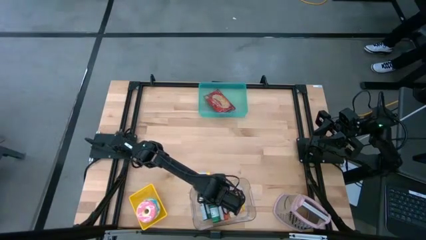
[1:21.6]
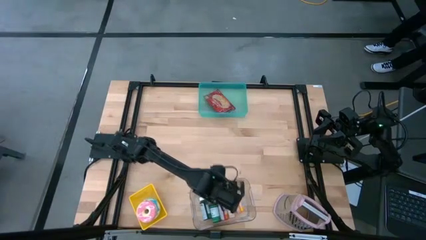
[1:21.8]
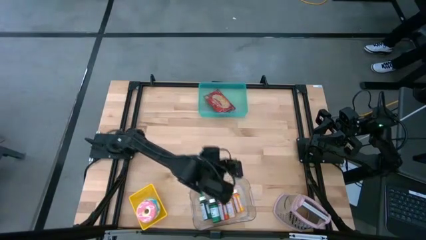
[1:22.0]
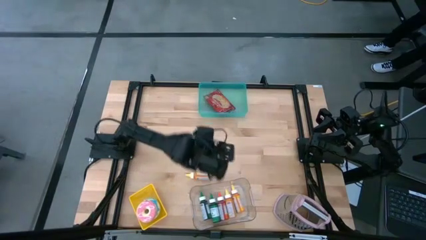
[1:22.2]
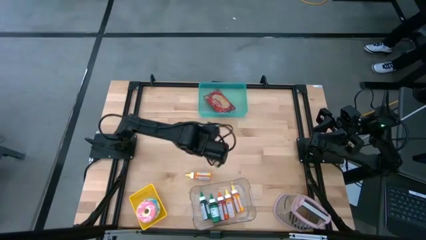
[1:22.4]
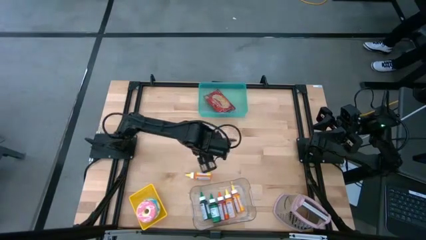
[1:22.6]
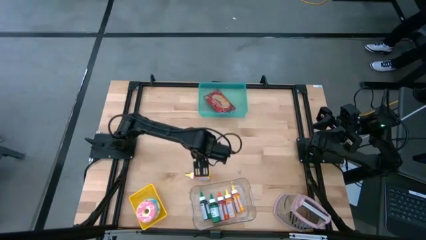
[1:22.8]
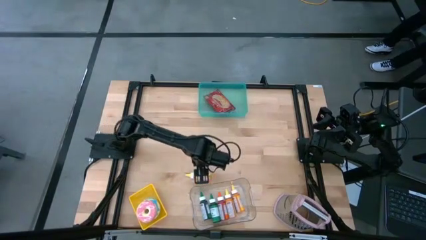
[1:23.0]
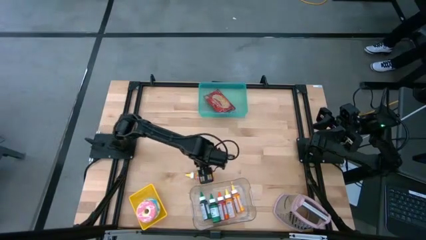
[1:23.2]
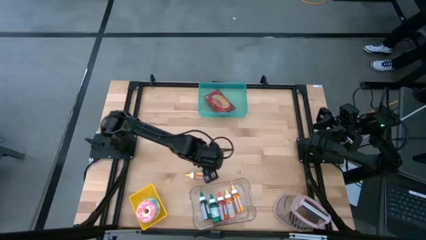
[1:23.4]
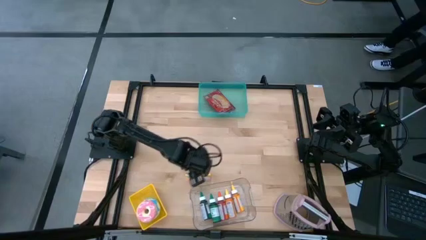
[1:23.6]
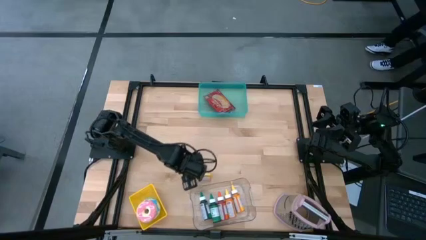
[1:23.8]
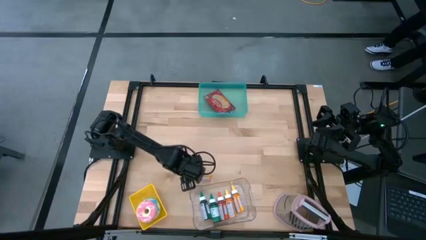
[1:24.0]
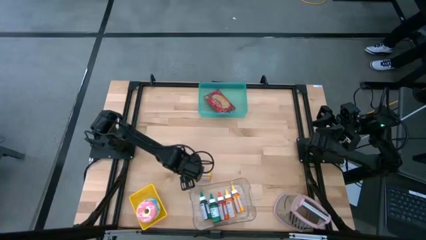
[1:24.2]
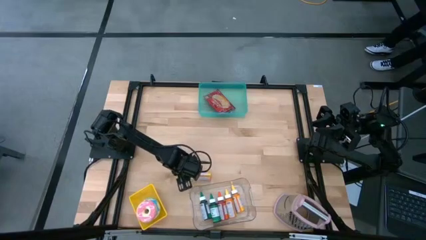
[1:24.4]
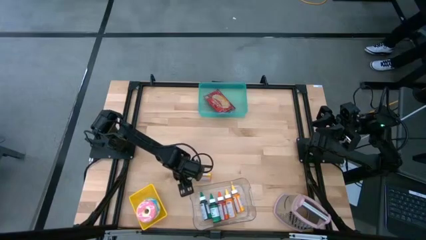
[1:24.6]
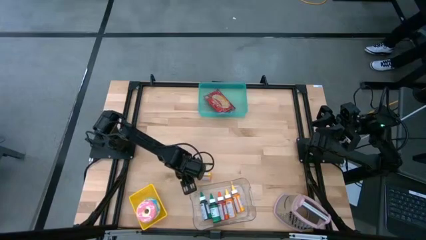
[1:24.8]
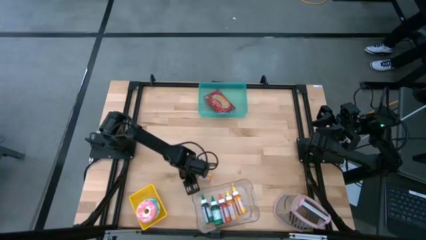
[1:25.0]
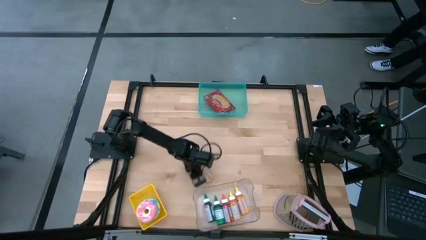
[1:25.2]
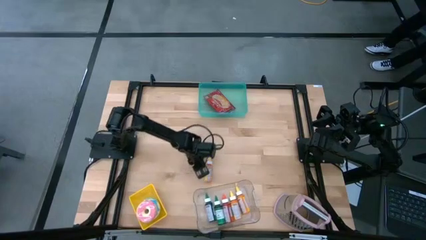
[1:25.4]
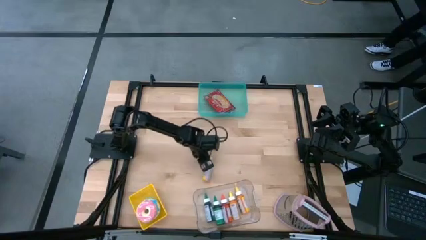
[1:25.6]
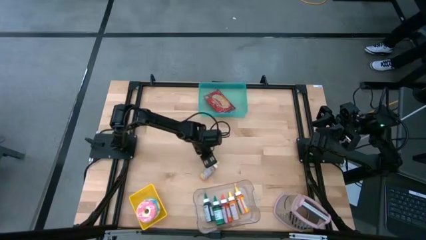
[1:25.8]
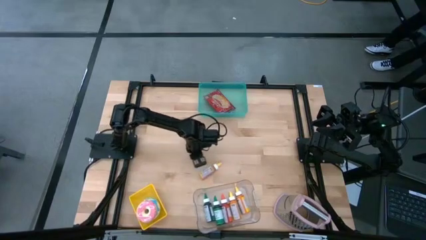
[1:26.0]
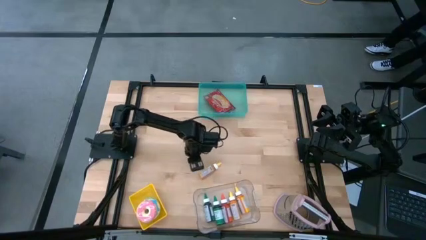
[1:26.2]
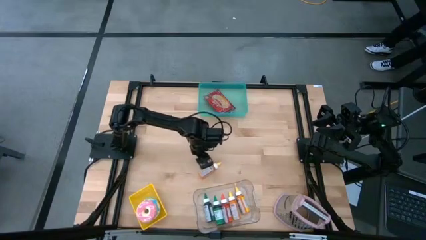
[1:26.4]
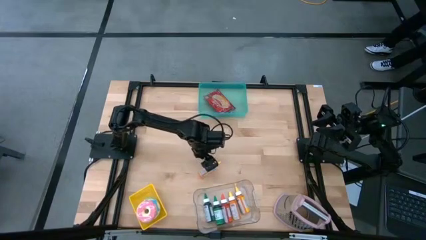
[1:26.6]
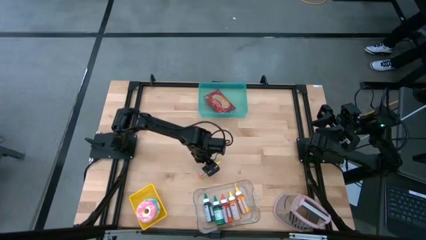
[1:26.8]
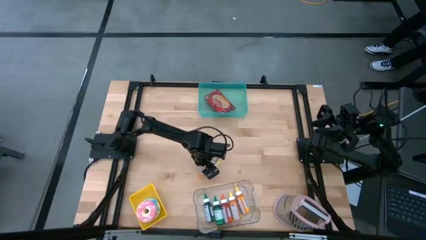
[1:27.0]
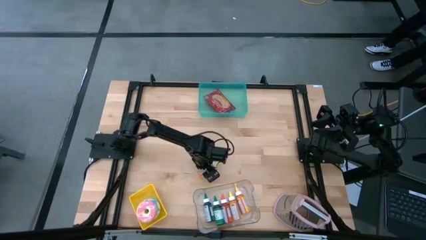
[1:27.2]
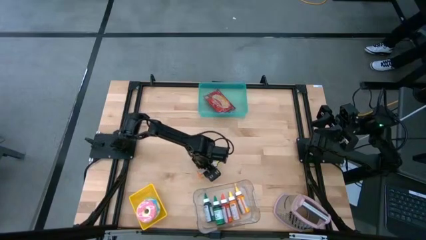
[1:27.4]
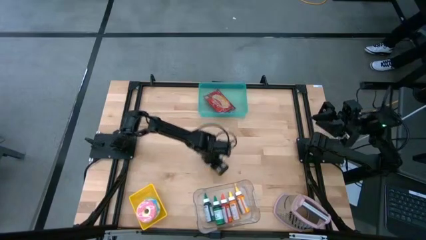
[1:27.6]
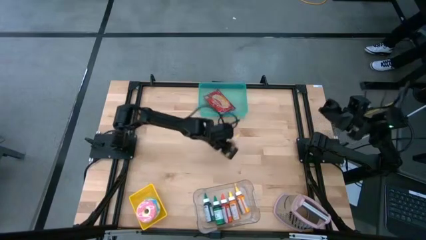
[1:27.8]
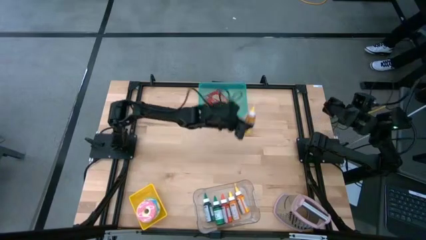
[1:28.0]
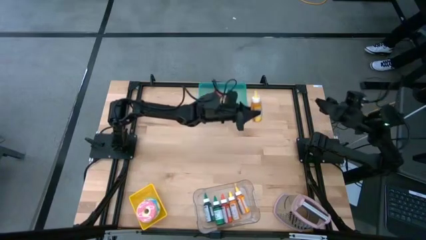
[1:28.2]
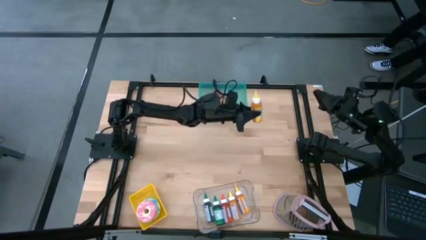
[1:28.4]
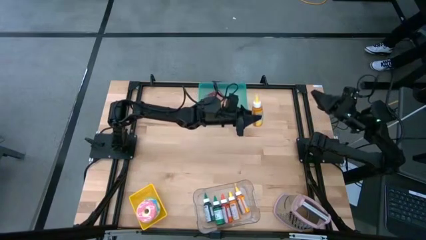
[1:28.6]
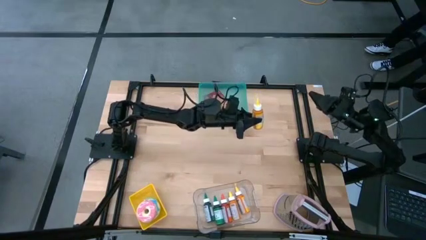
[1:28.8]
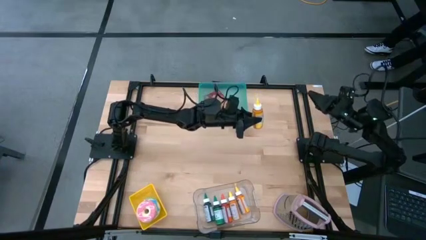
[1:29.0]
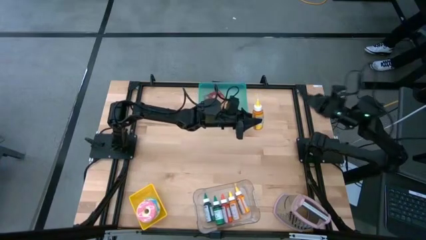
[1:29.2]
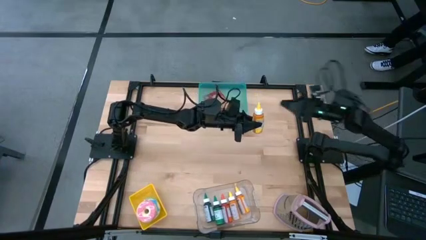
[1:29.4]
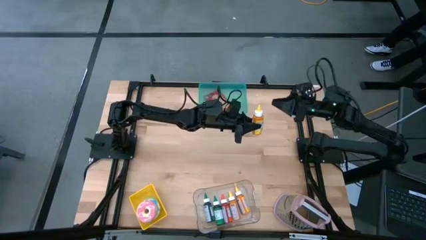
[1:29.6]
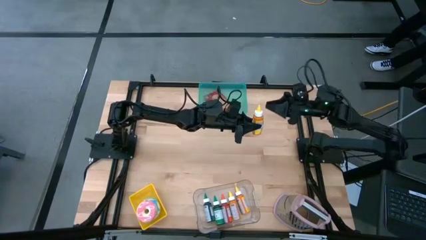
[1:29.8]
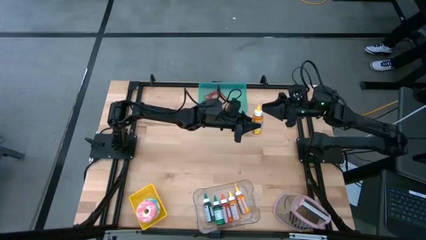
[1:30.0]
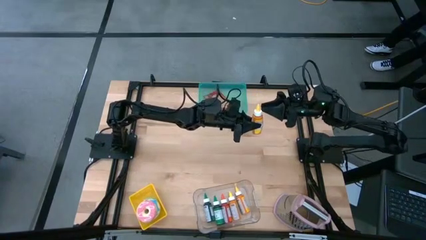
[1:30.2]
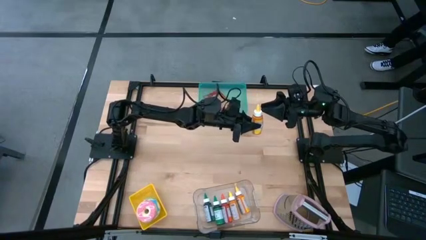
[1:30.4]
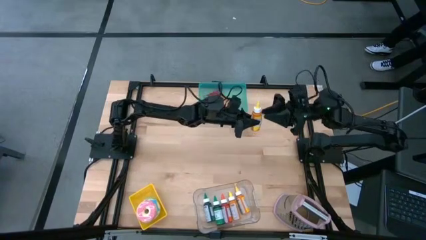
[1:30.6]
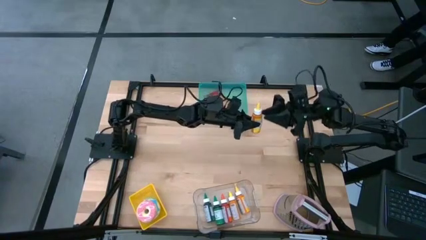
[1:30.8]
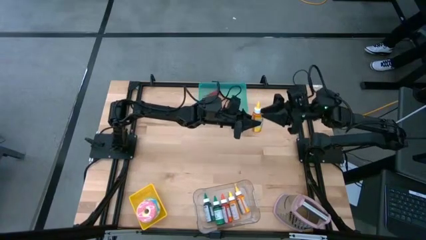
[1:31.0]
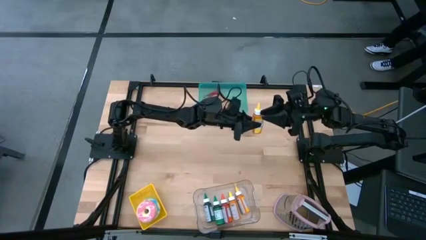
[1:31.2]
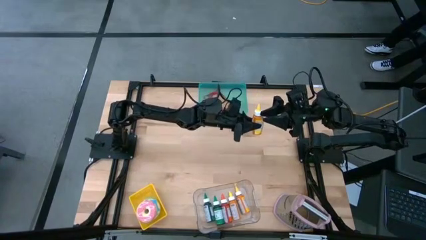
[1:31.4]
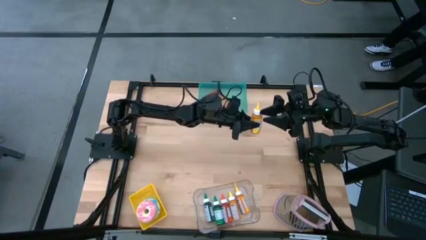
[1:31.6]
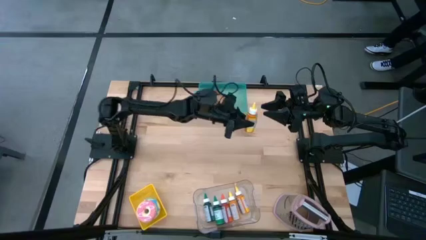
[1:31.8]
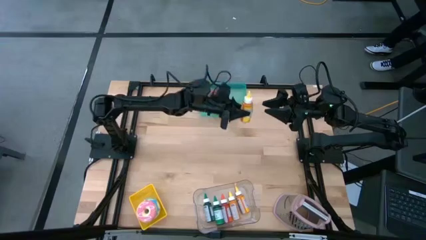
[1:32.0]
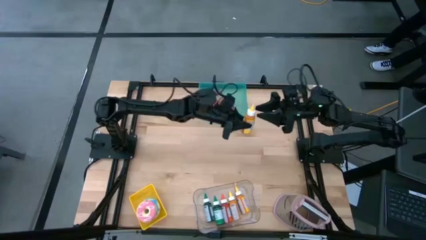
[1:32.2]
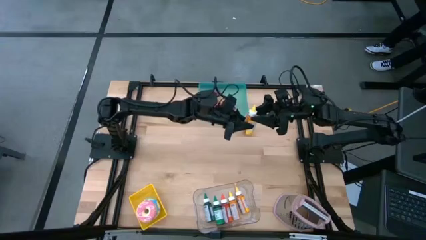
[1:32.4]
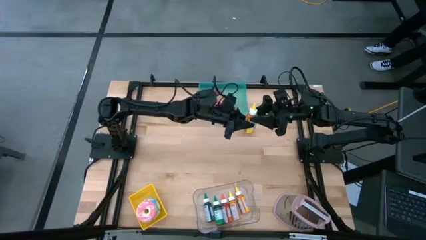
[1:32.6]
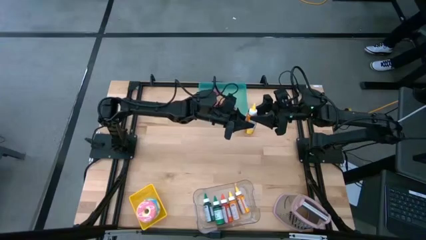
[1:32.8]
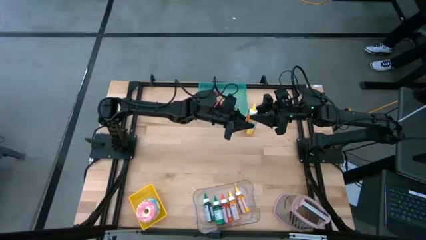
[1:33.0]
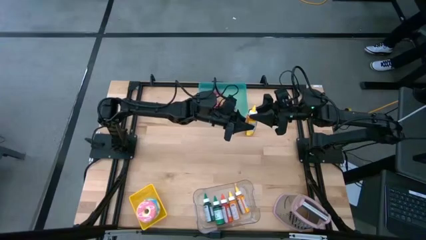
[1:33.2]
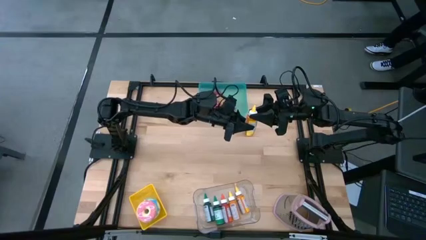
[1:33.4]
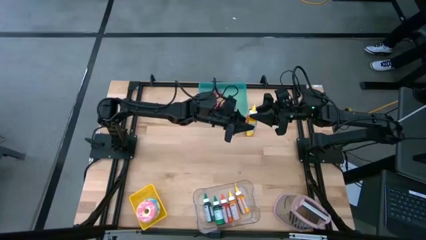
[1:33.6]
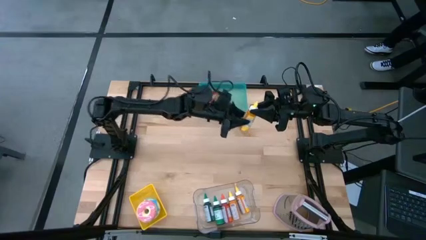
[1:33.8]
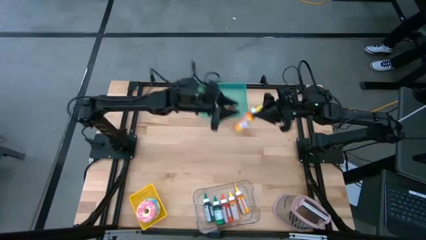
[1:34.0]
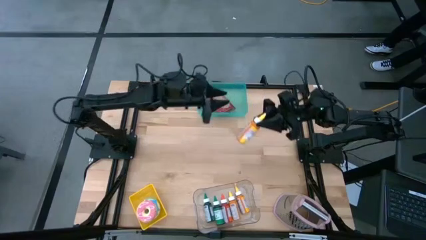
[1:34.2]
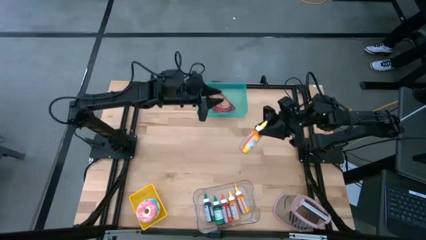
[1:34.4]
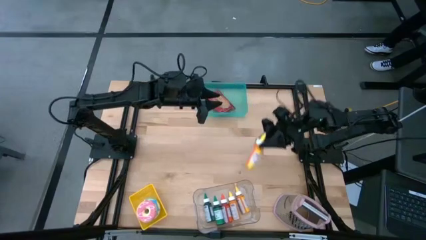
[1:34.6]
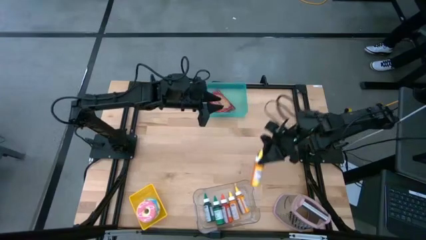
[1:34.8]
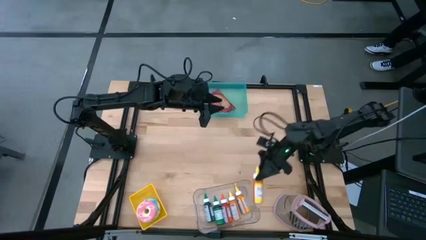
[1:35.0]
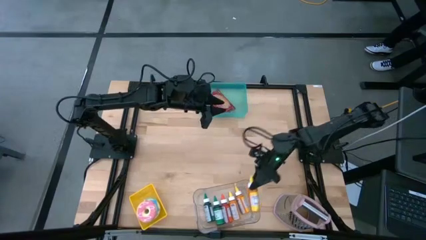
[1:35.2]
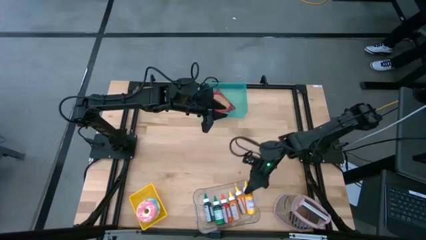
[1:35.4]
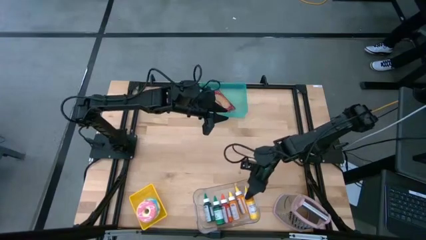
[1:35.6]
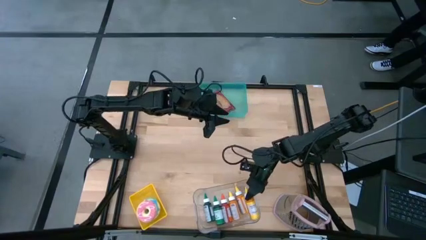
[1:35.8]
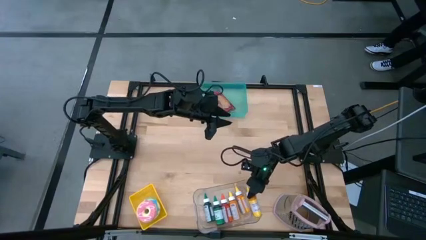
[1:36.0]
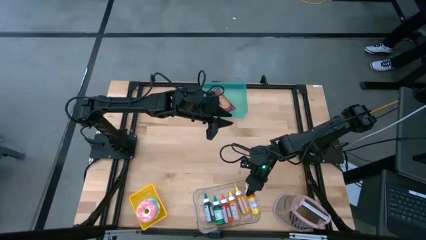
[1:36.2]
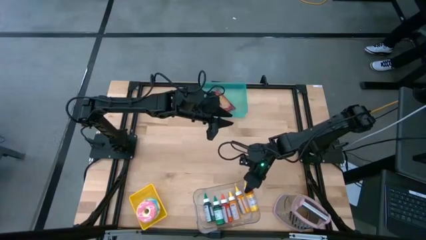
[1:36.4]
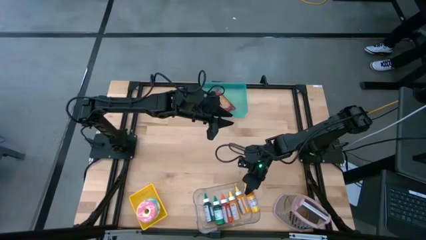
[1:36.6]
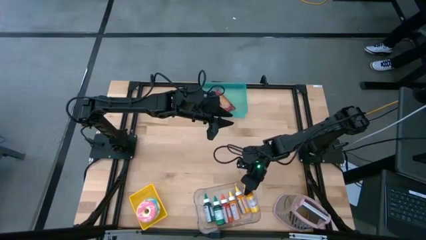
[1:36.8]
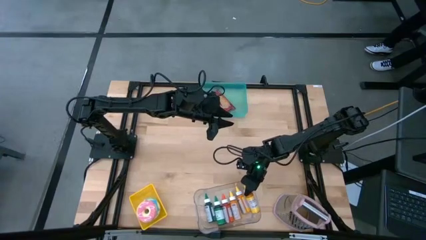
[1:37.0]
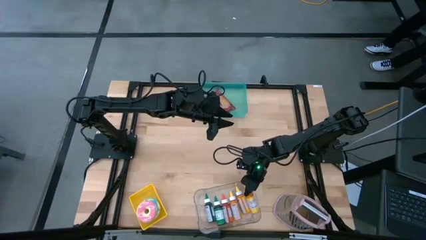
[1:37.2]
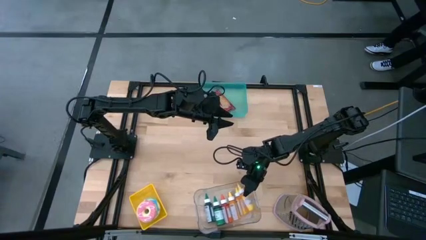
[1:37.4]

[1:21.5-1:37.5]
Put the yellow food coloring bottle into the transparent bin
